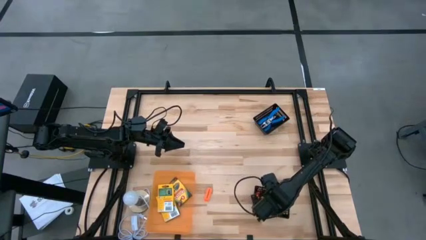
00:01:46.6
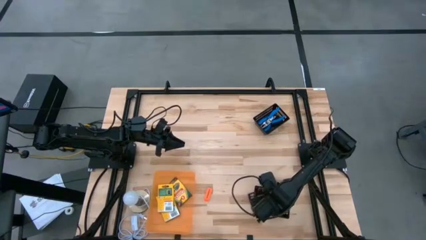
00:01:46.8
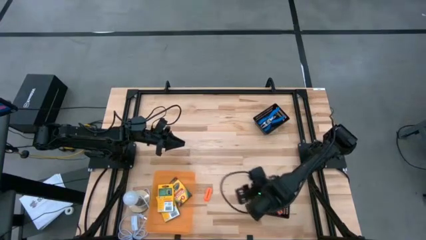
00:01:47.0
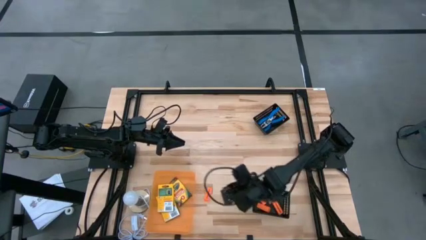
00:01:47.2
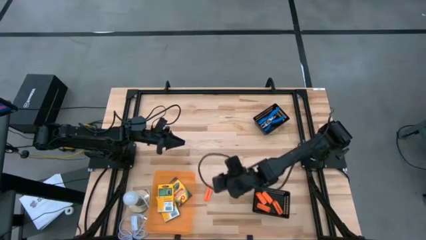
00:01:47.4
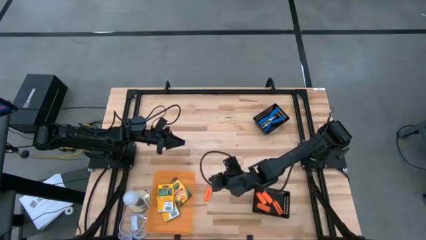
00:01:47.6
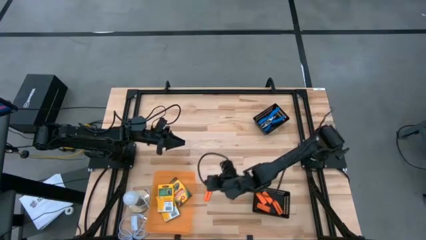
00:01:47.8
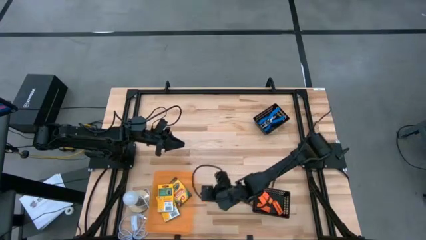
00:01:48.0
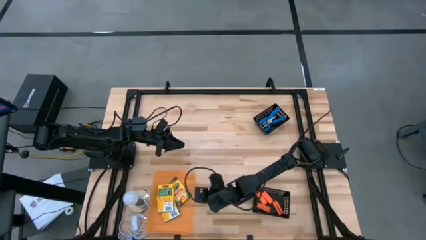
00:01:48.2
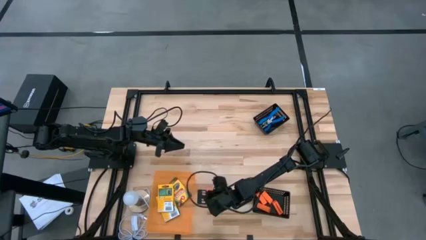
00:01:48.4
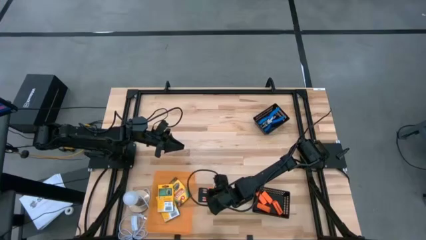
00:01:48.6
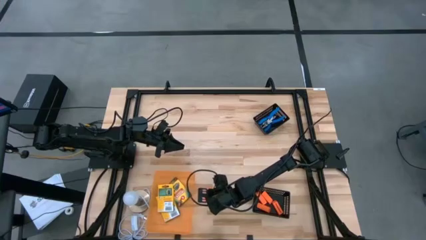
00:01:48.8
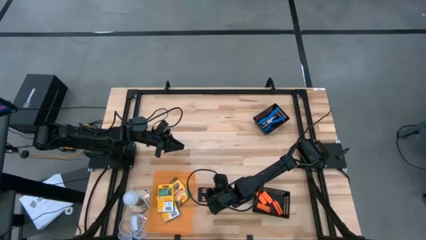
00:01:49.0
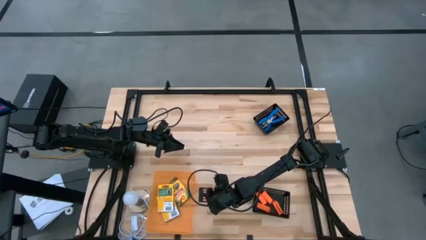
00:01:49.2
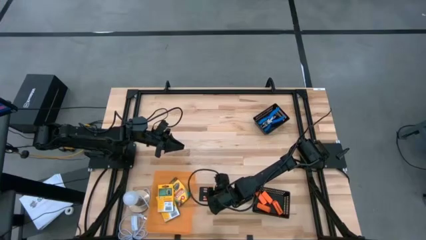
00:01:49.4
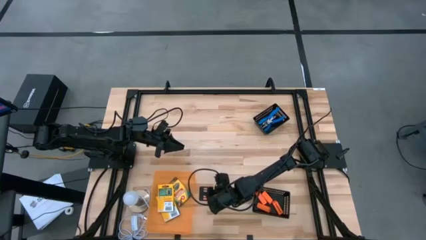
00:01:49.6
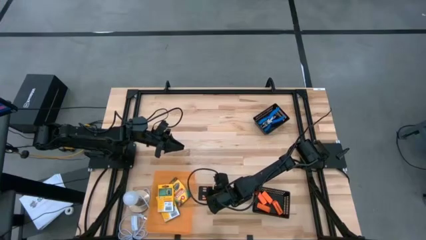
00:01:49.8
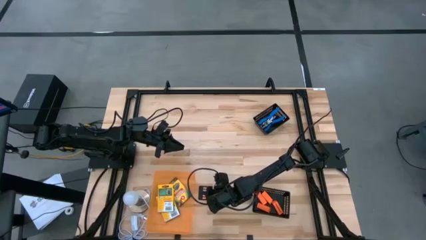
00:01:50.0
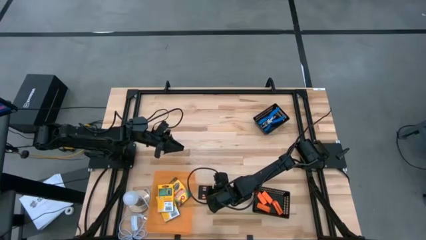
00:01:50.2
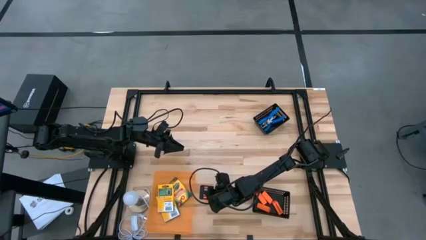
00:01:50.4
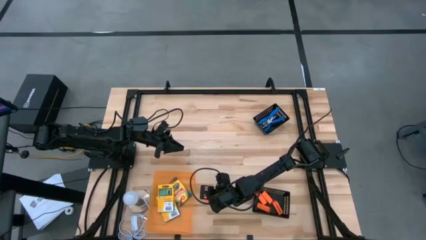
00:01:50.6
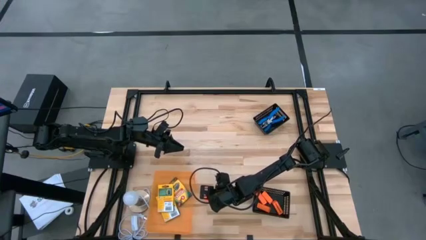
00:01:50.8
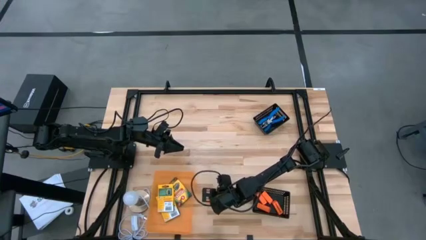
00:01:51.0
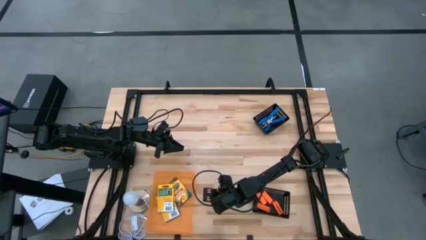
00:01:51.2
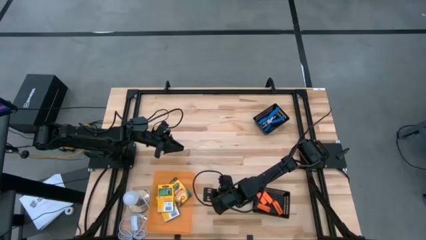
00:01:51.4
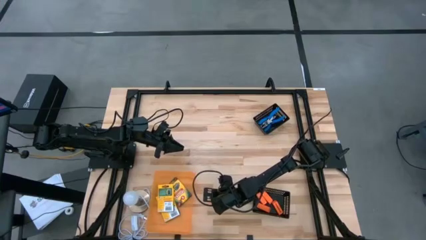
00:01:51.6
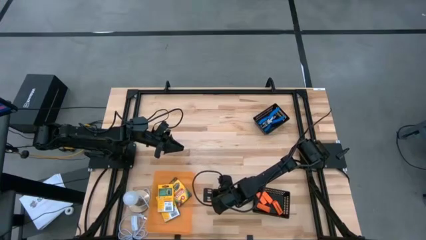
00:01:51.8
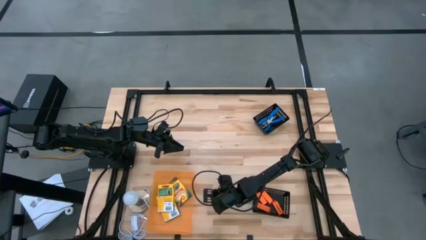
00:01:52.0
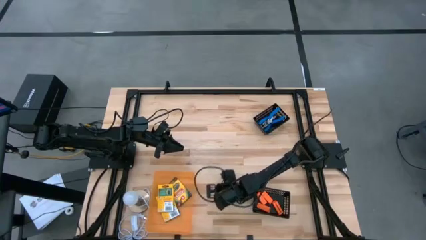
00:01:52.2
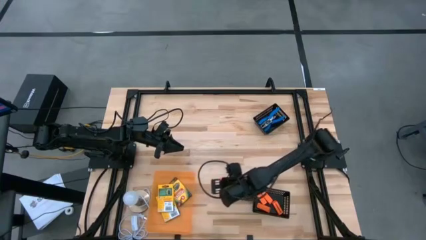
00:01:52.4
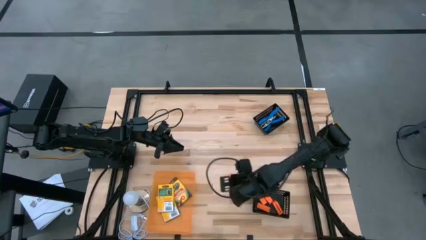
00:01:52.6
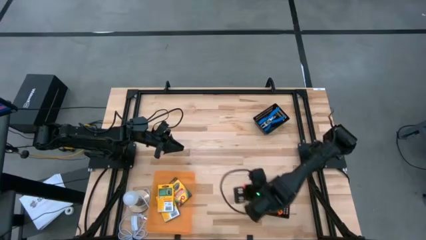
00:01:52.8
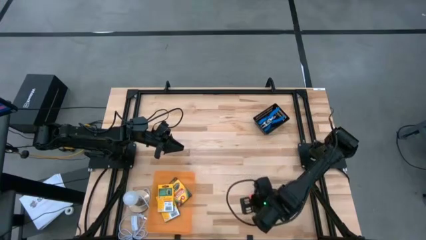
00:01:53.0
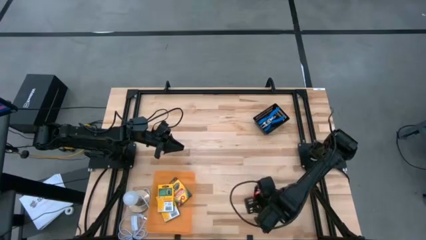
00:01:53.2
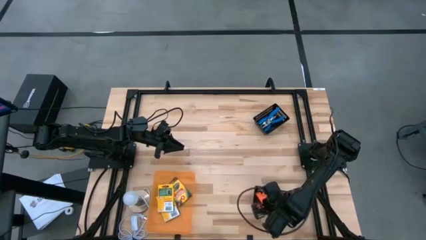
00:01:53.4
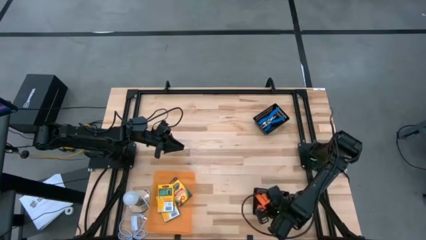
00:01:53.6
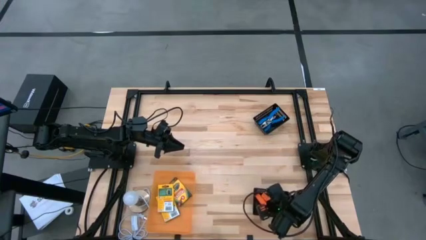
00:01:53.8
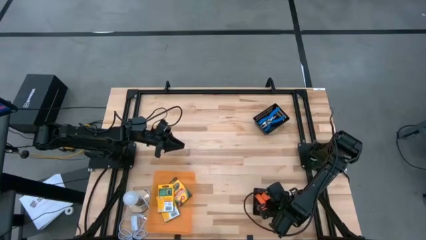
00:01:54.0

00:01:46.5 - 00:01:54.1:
Task: Pick & Place School Supplies
Put the orange eraser into the bottom black bin

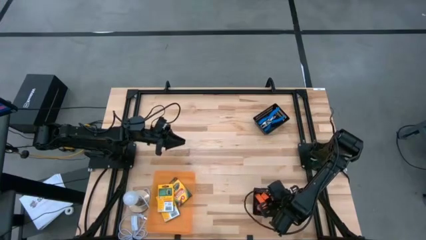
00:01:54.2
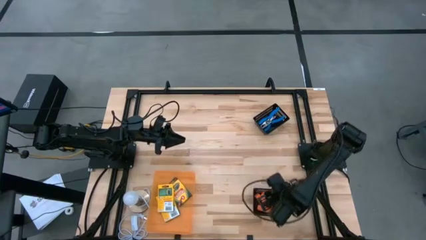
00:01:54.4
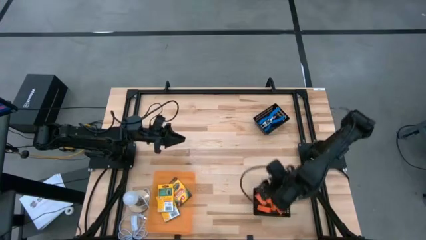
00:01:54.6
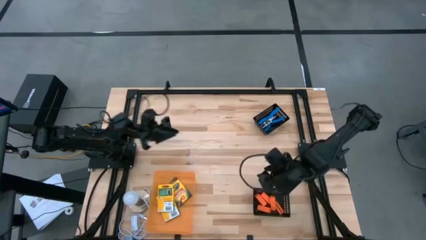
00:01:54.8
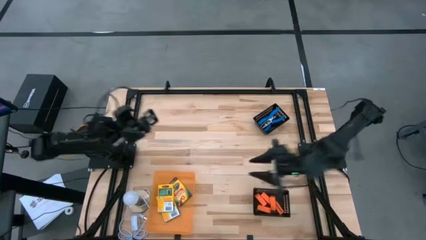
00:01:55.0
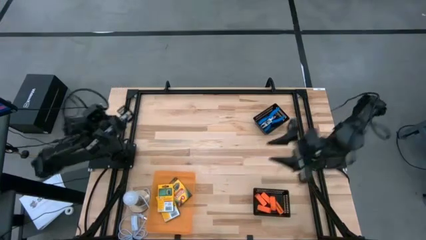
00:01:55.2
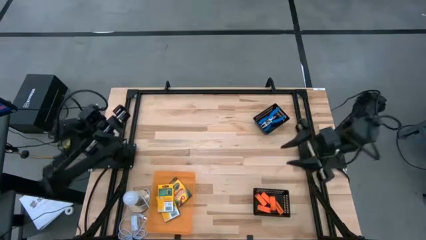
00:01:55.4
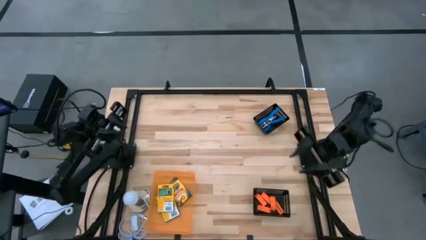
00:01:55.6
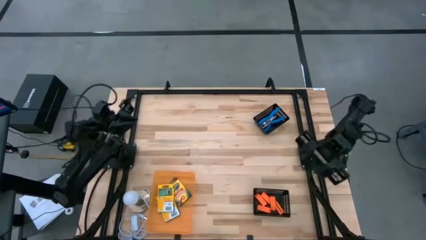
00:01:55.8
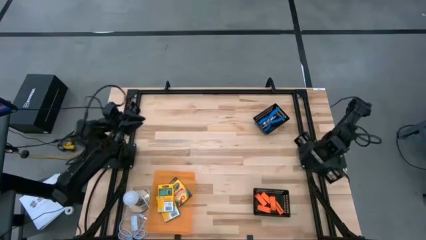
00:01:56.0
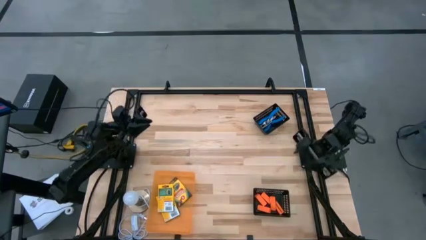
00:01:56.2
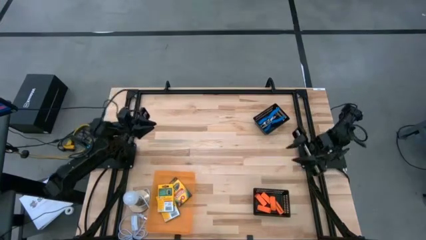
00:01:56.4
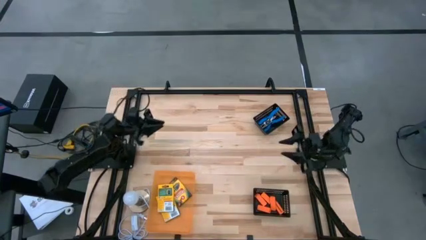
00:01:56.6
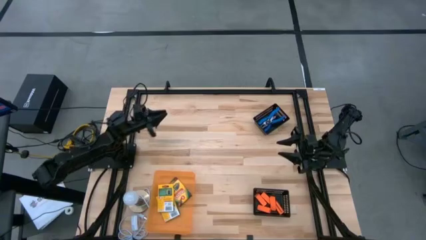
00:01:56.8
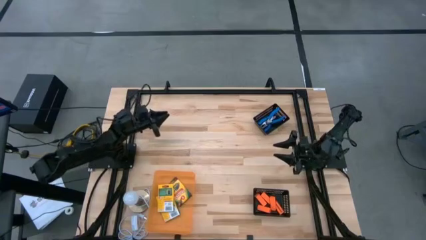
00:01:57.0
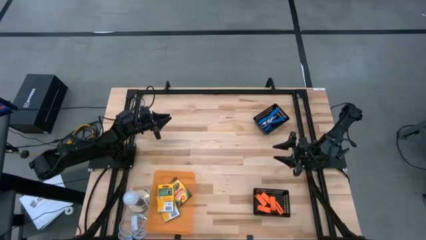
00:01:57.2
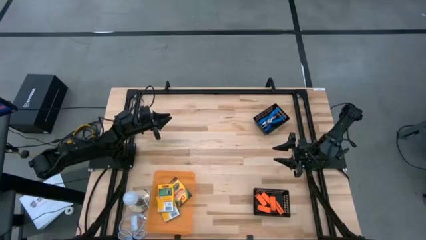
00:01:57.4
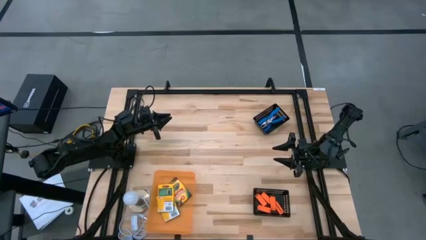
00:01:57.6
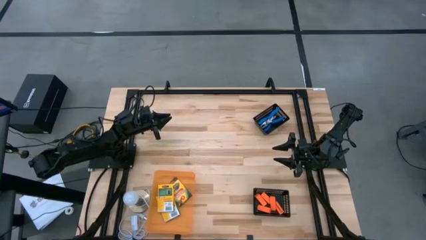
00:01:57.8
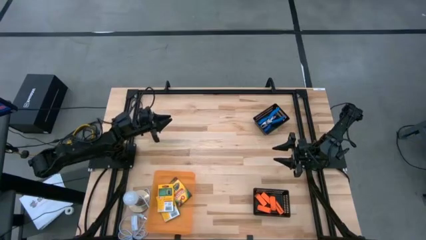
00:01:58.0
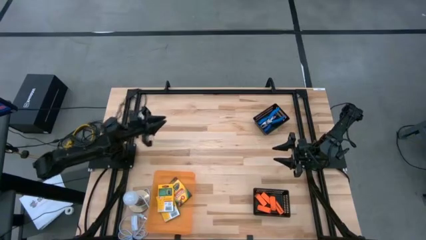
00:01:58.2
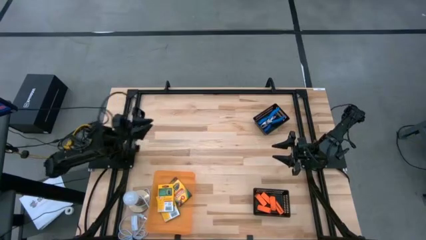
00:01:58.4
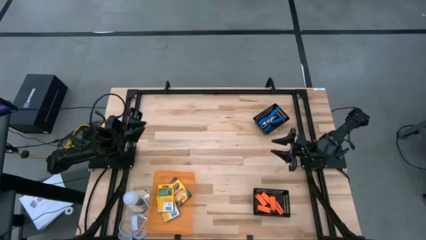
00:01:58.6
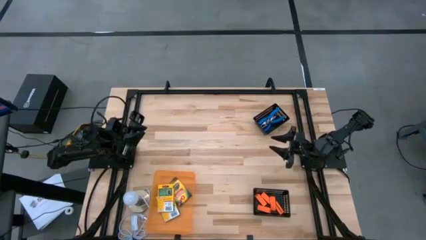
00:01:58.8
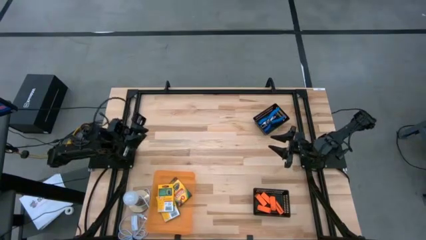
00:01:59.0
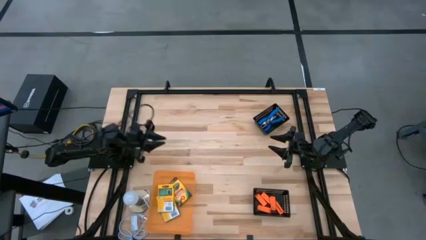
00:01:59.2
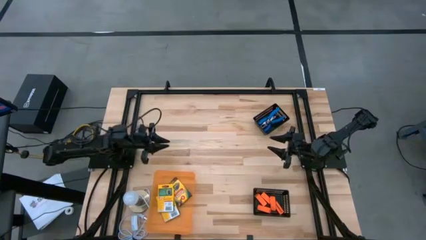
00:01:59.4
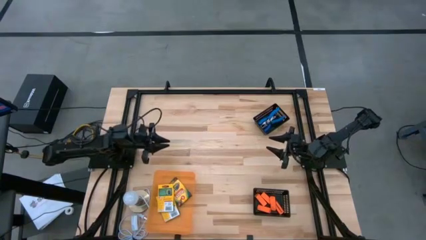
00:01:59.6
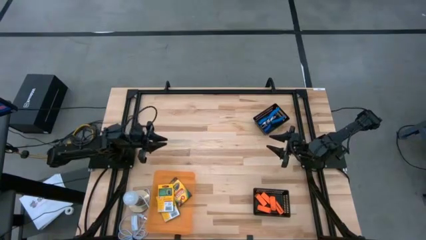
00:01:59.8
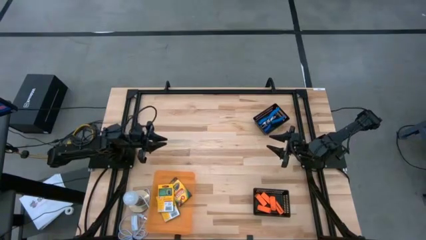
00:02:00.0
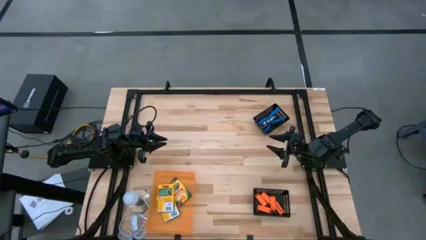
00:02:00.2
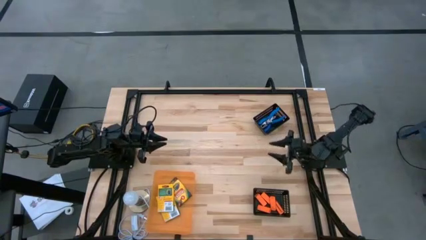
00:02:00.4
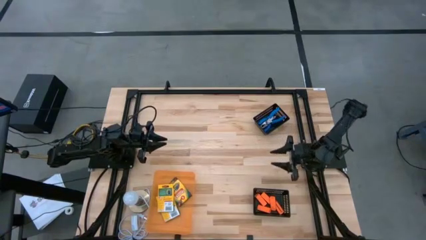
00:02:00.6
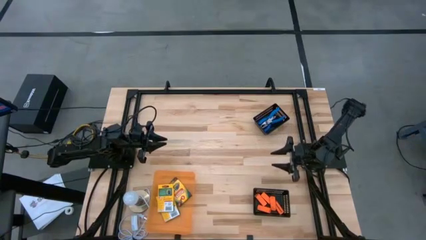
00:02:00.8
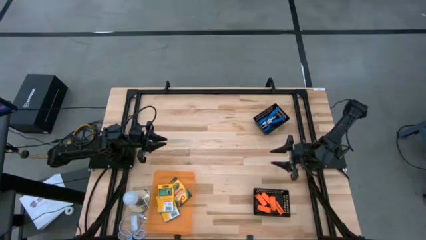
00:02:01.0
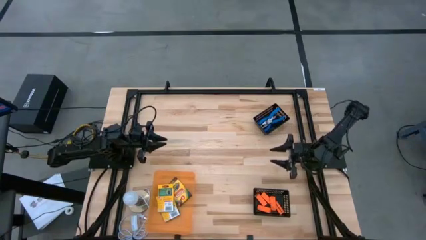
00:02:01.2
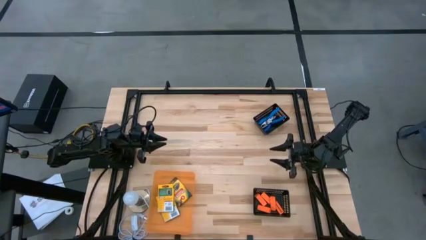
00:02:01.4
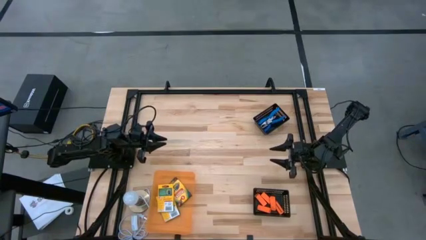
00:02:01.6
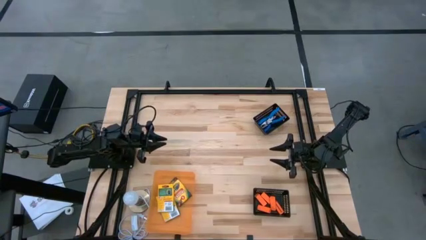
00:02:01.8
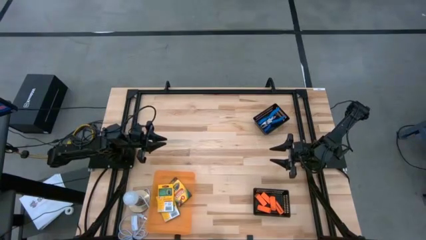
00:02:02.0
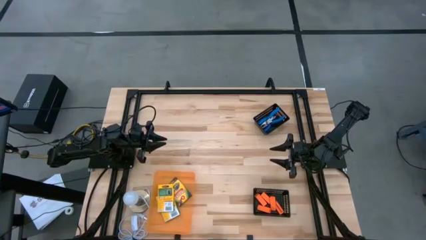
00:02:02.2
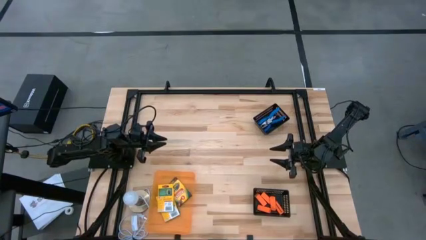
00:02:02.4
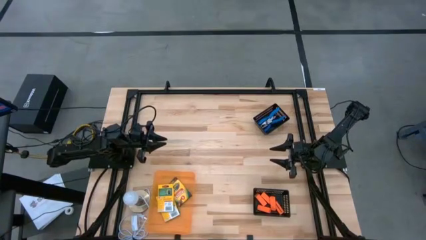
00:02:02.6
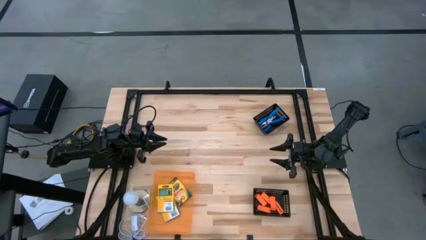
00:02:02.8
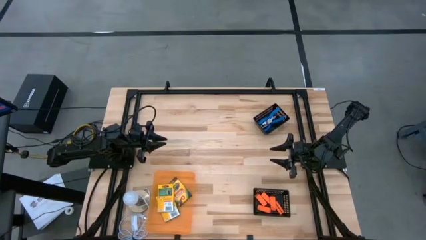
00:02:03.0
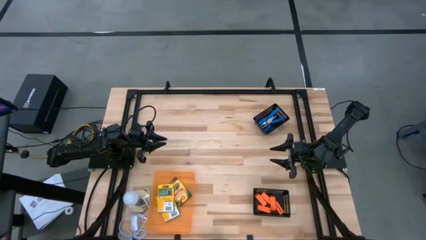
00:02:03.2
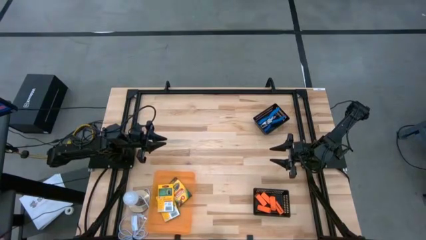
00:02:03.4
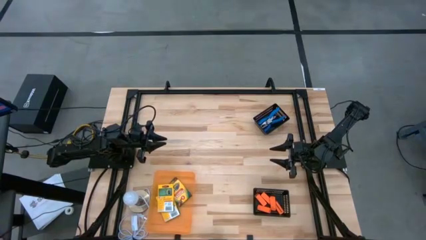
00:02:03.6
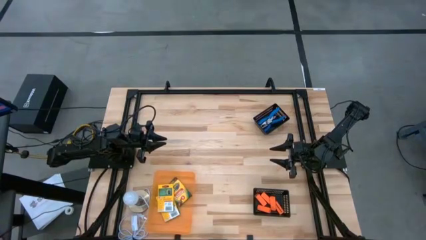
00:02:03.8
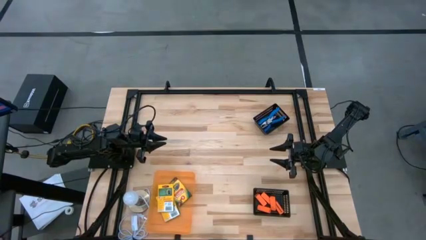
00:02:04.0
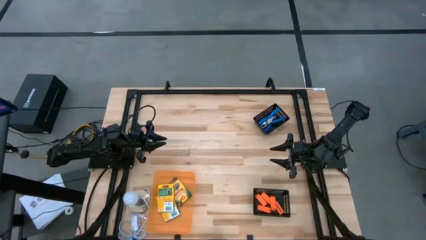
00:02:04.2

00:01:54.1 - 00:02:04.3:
Return to Home Position
